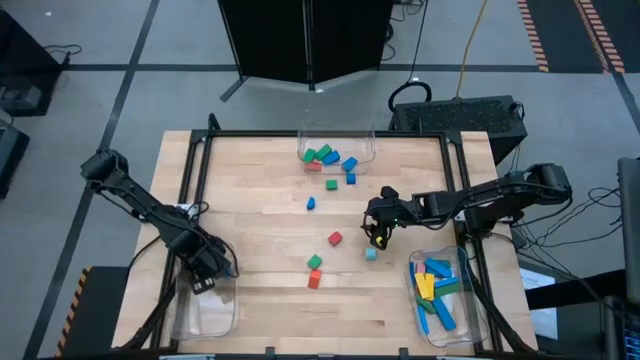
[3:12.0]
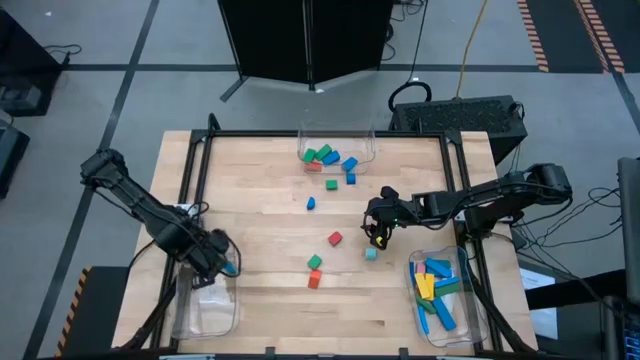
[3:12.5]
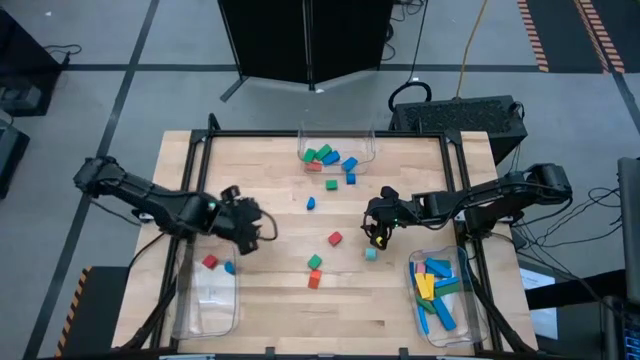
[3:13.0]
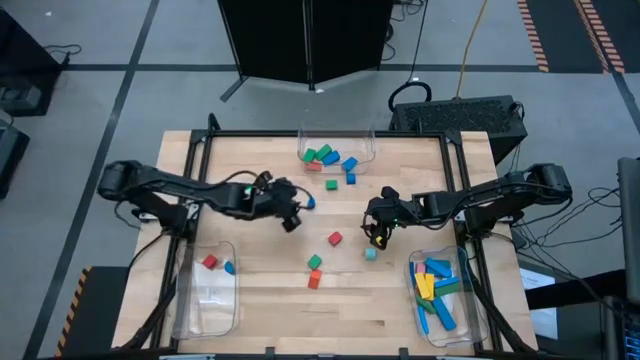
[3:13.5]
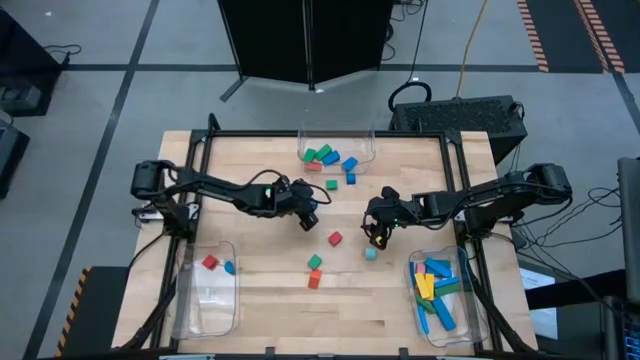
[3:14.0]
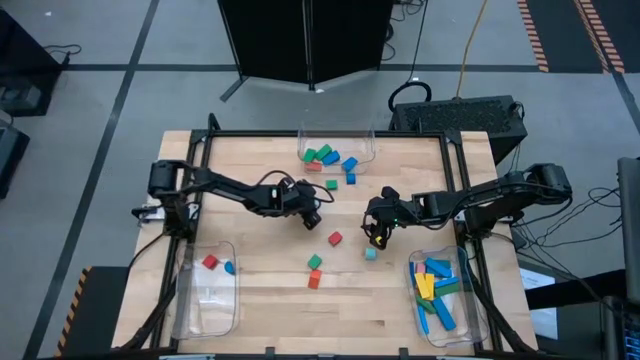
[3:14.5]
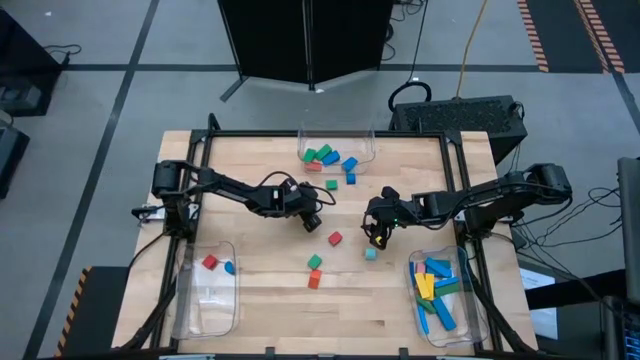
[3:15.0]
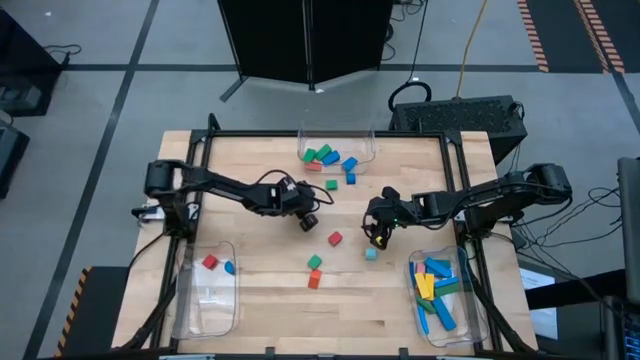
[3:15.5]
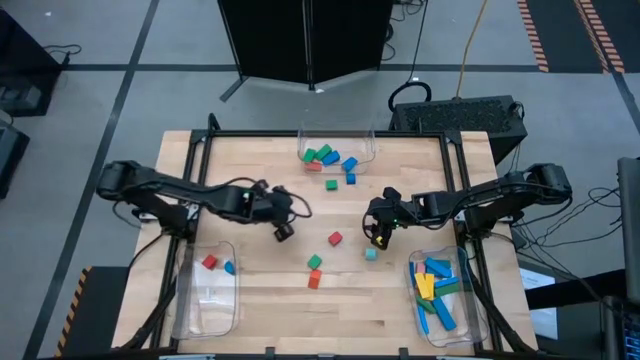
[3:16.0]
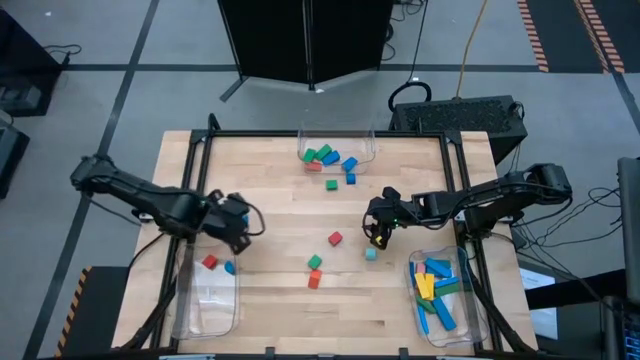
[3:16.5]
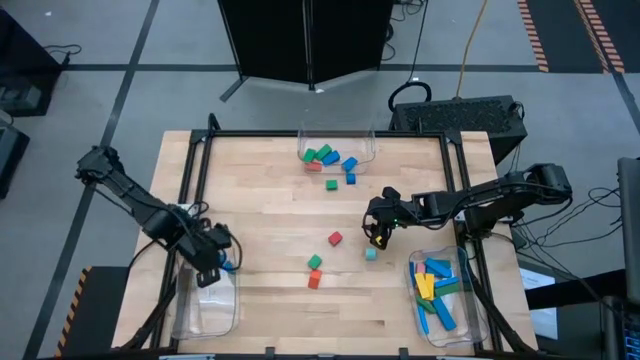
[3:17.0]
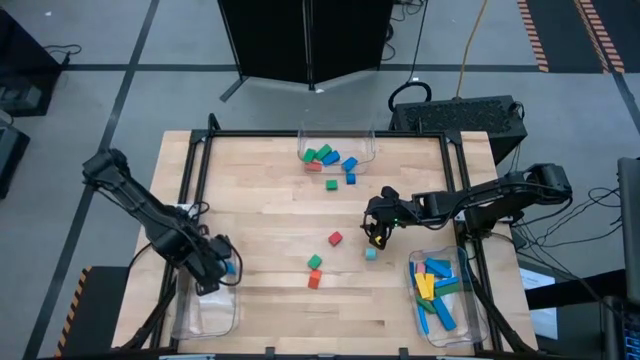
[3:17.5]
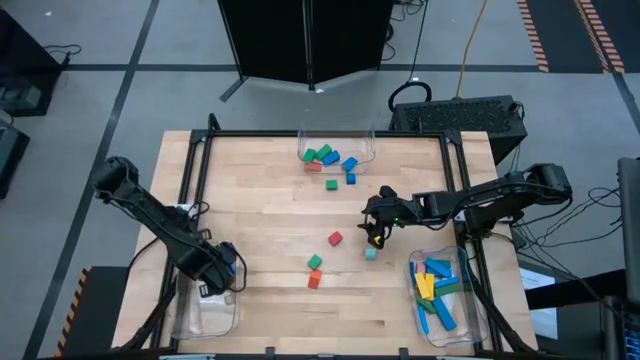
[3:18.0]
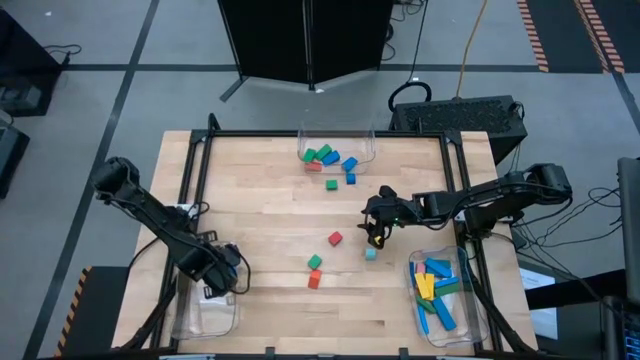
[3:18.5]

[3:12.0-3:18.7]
Task: Sort blocks by size
Put the dark blue half circle block into the bottom left transparent bin

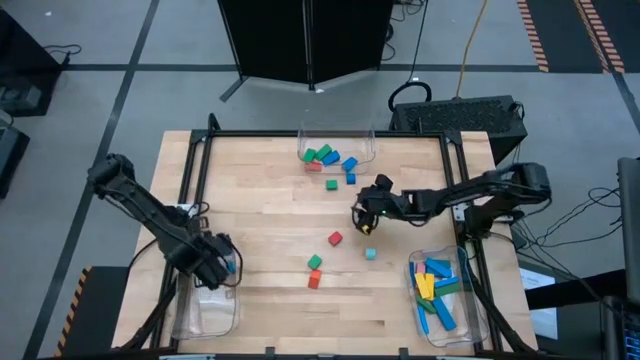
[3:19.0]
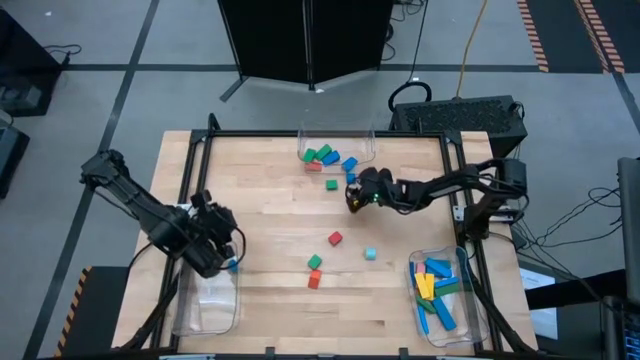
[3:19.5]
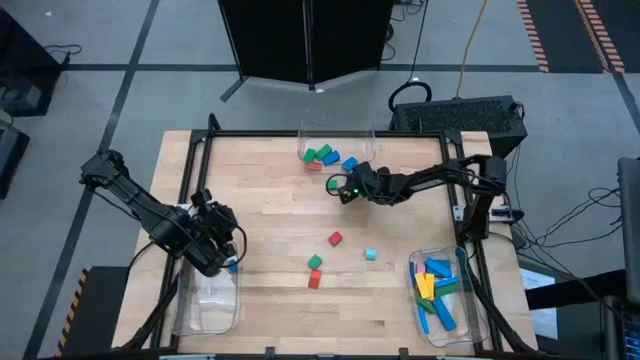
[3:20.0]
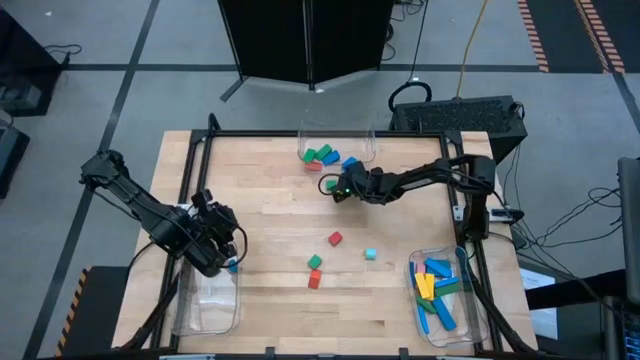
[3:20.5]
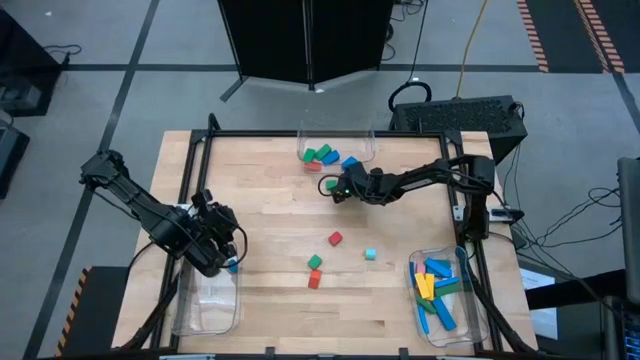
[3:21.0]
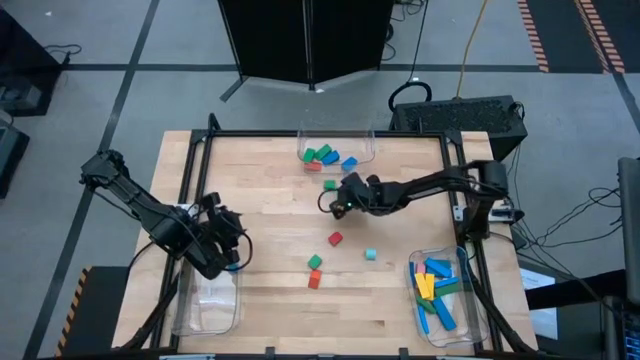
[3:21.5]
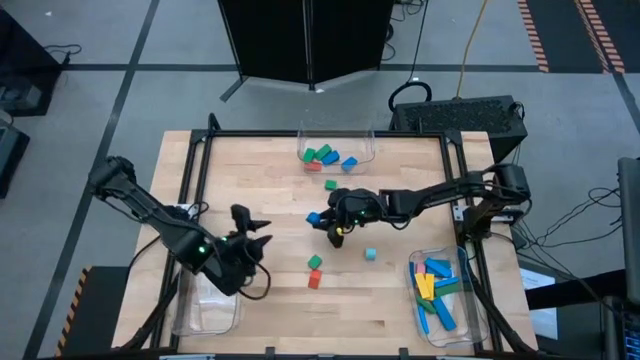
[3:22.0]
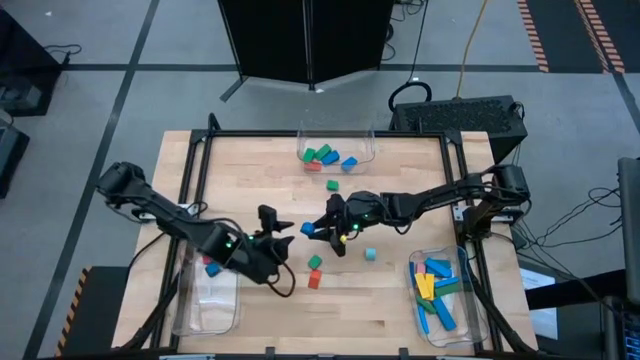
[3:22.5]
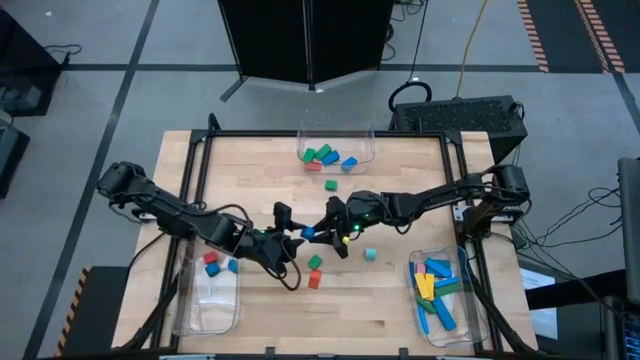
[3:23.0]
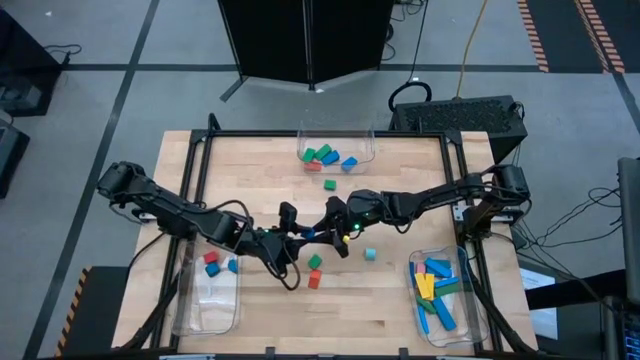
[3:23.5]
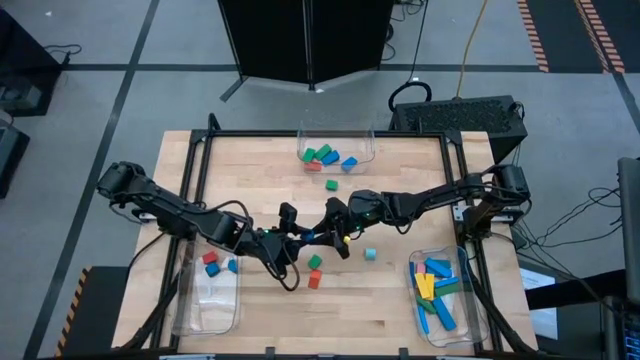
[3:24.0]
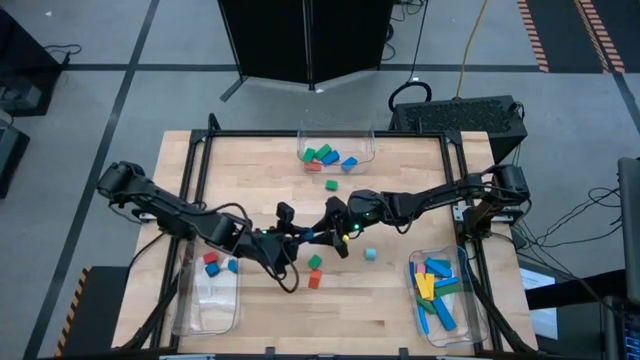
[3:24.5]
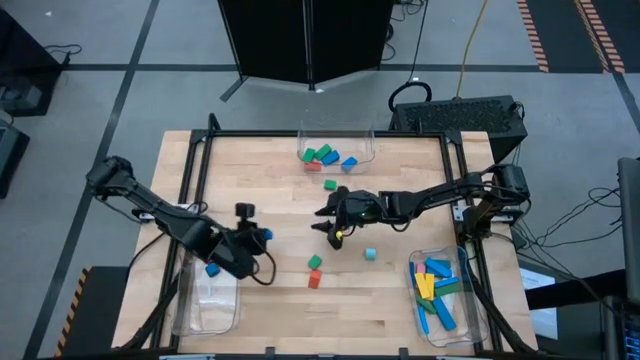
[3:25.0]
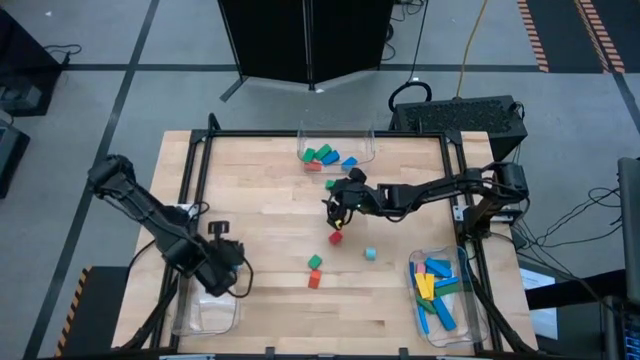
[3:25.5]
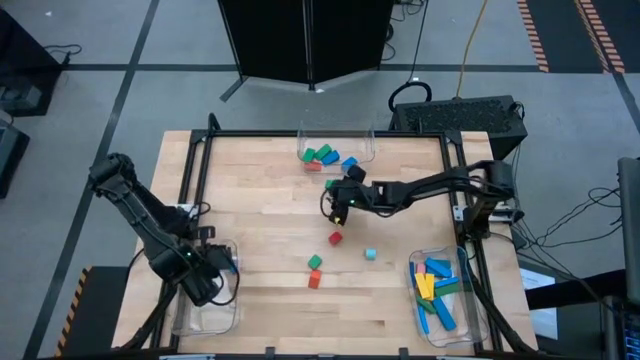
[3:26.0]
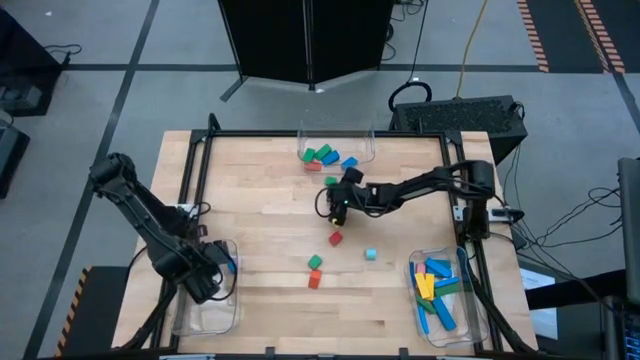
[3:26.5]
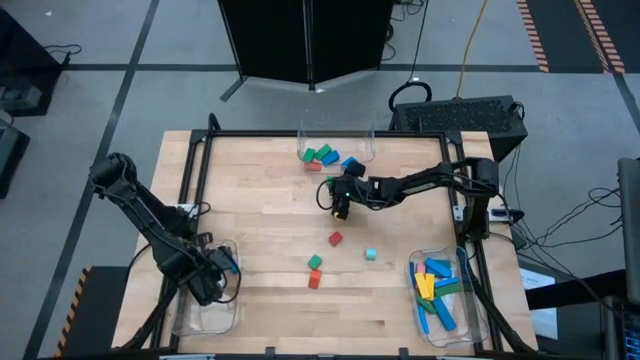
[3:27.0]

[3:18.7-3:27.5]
Put the dark blue half circle block into the bottom left transparent bin

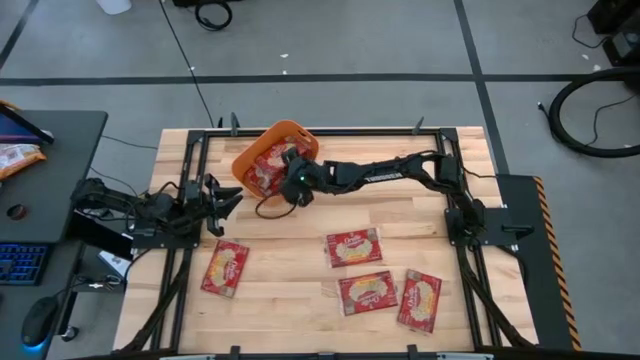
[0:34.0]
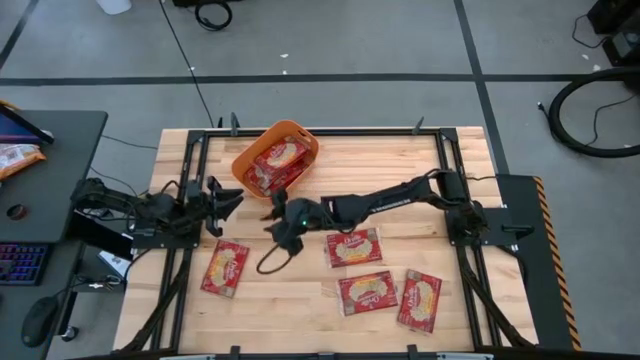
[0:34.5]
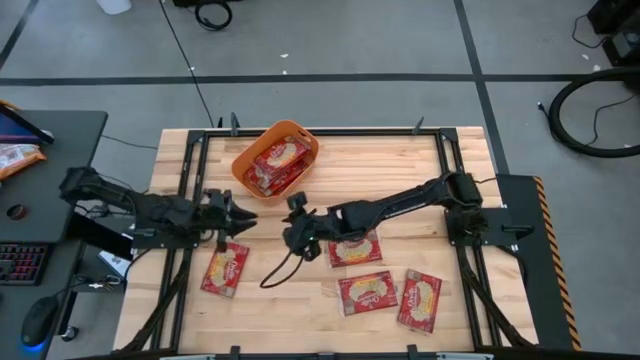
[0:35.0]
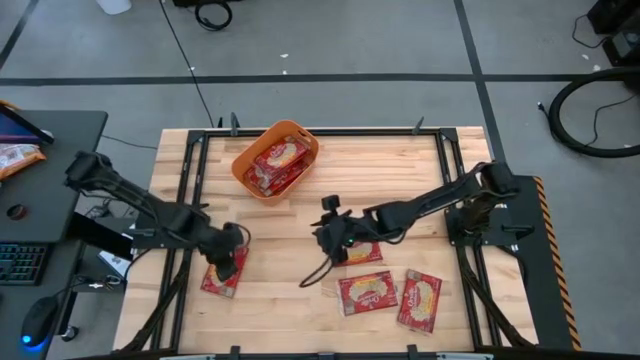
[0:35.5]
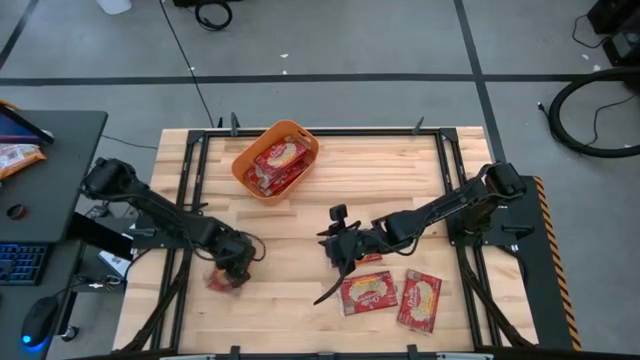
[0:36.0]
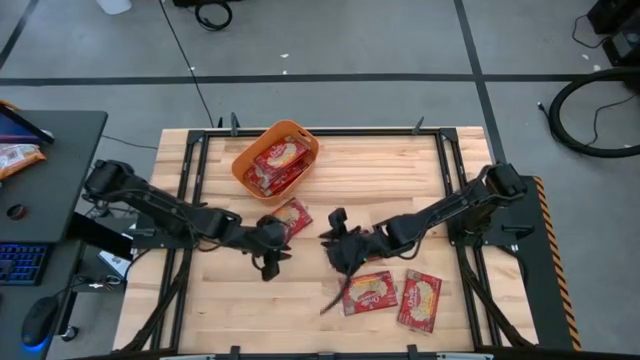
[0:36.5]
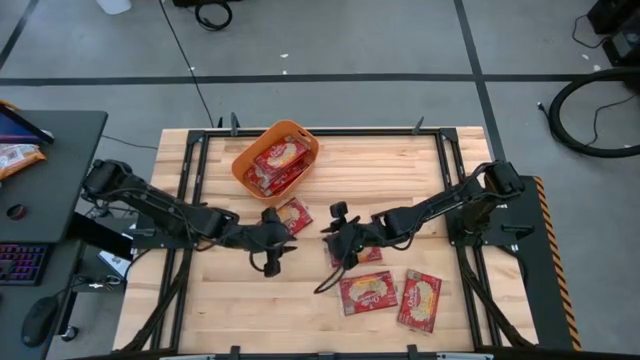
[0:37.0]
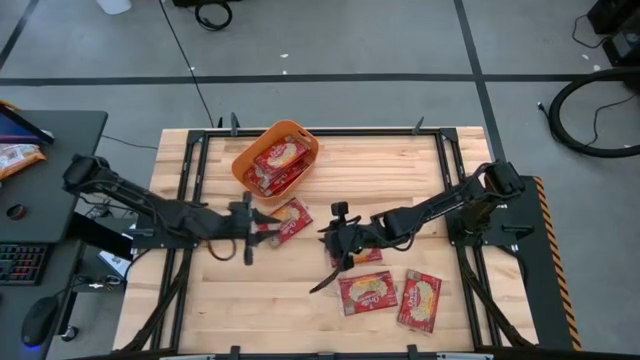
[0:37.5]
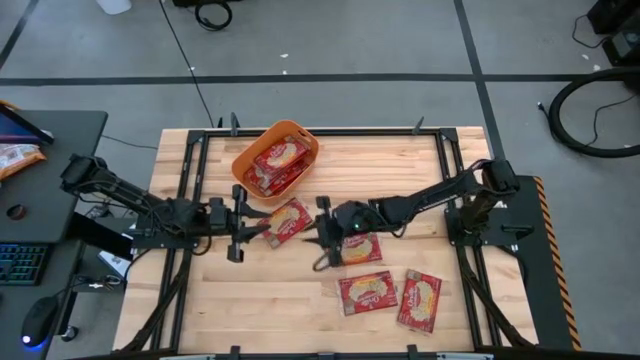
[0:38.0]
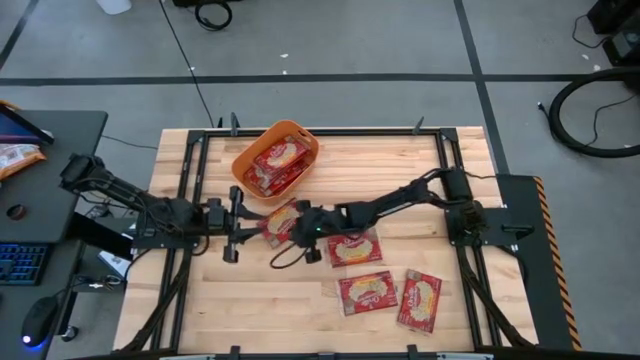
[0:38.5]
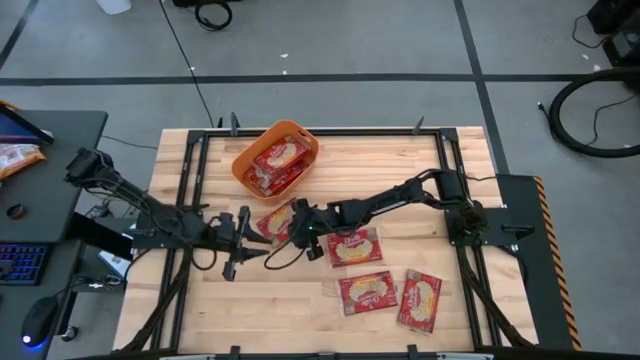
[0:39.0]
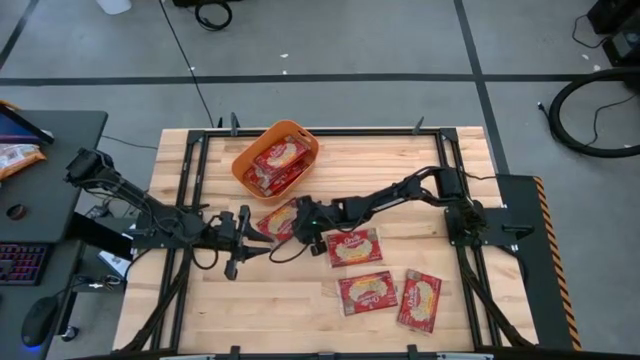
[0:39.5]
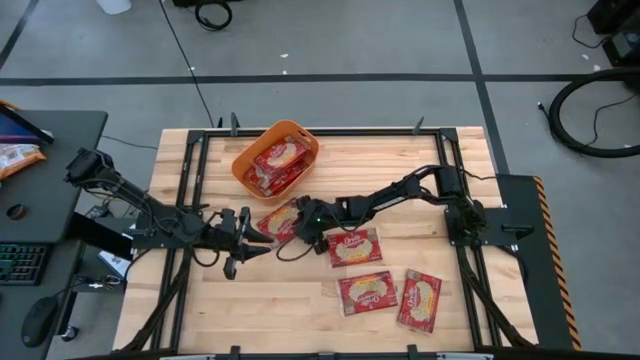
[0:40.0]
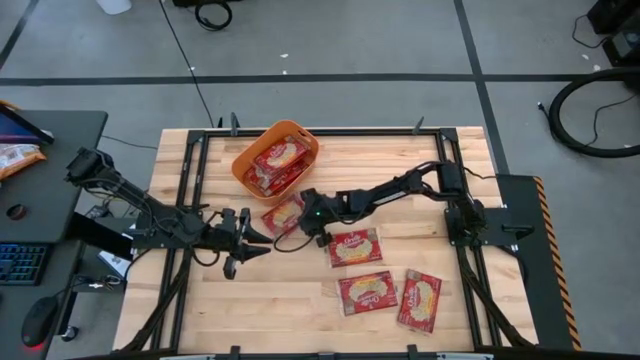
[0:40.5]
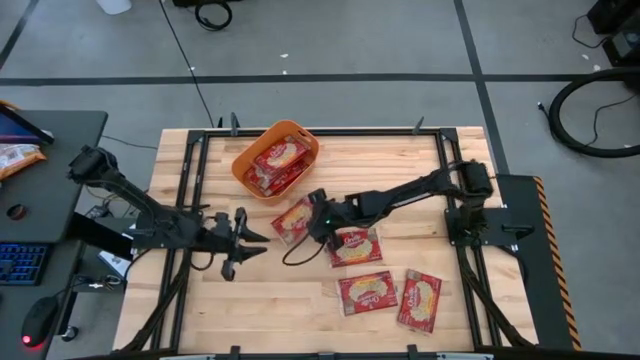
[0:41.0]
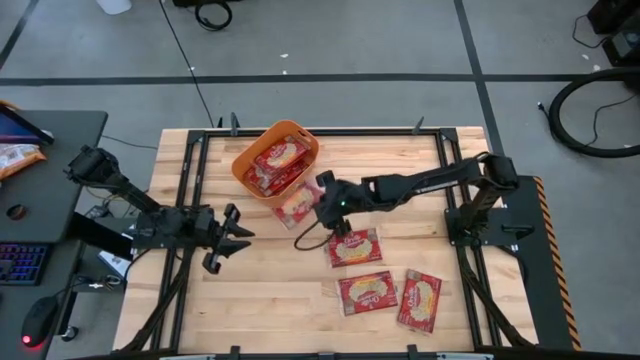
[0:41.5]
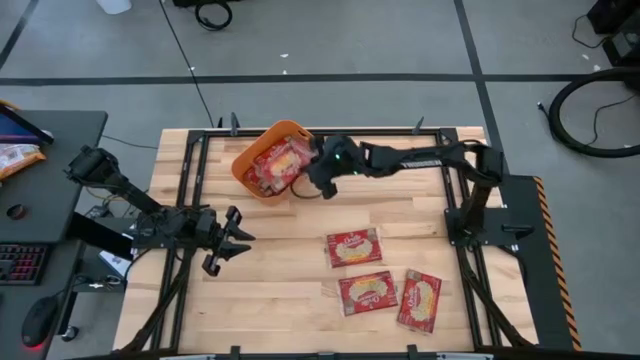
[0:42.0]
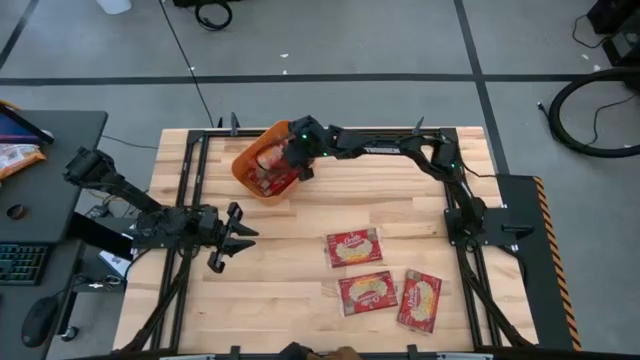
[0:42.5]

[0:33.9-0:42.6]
Task: Sort popcorn bags into baskets
Put the red popcorn bag into the orange bin
